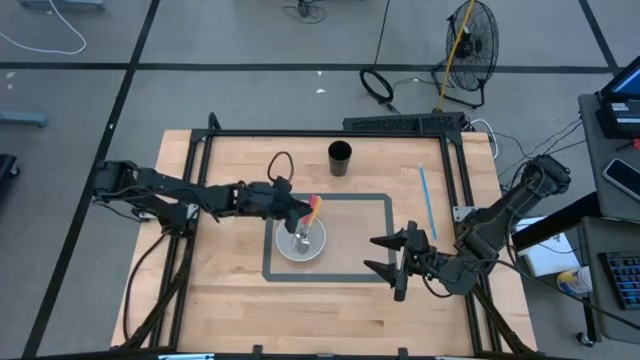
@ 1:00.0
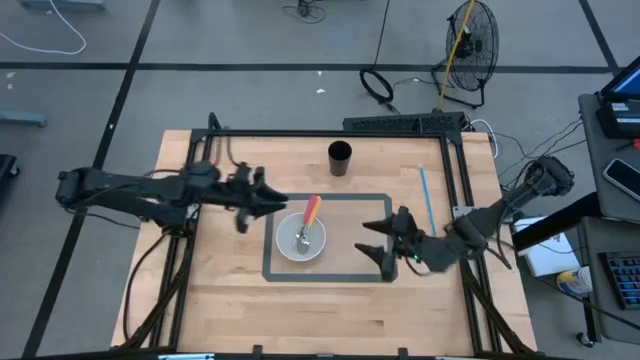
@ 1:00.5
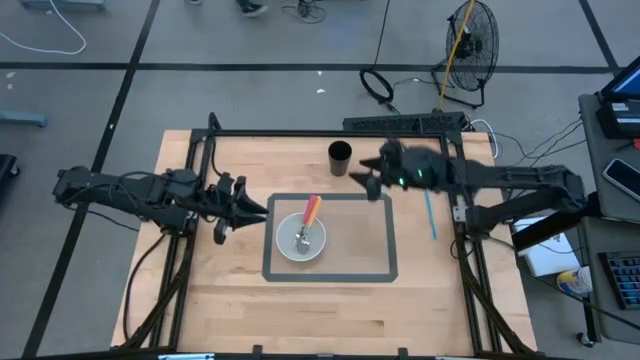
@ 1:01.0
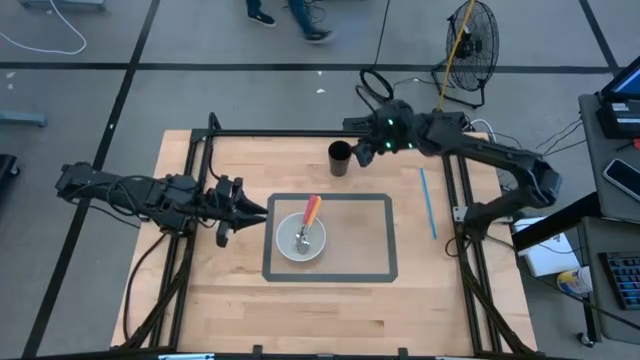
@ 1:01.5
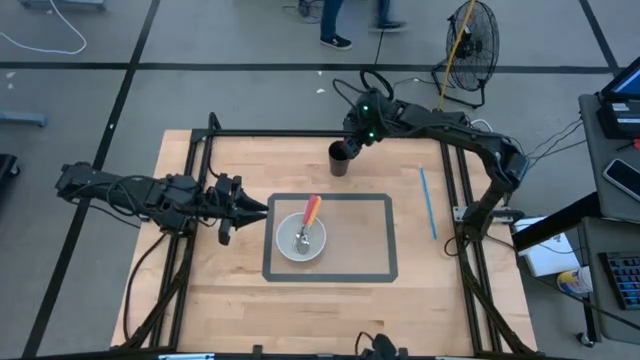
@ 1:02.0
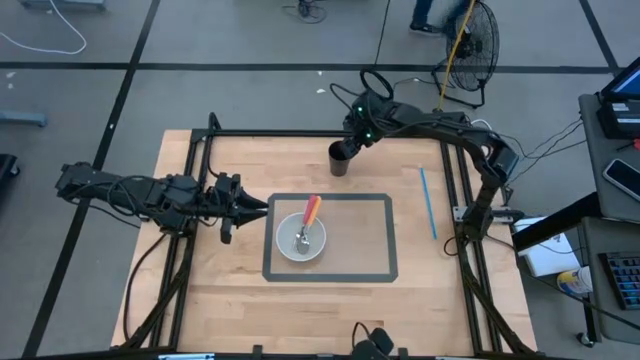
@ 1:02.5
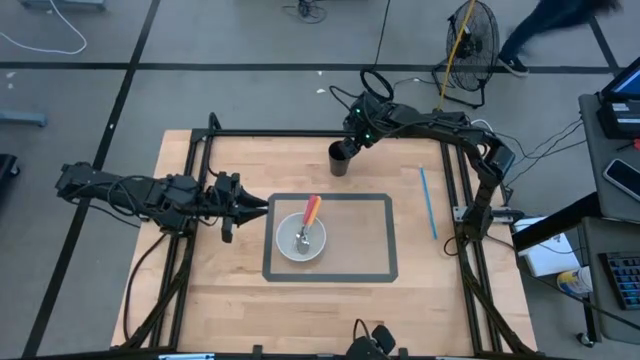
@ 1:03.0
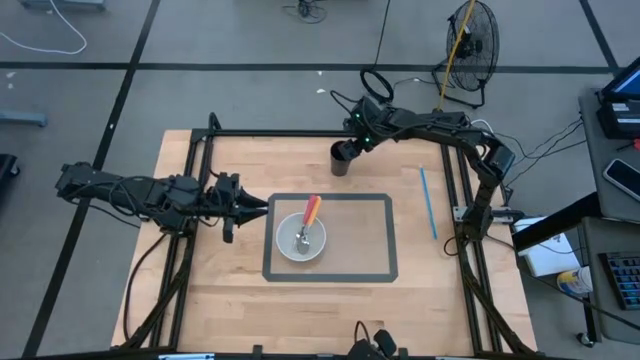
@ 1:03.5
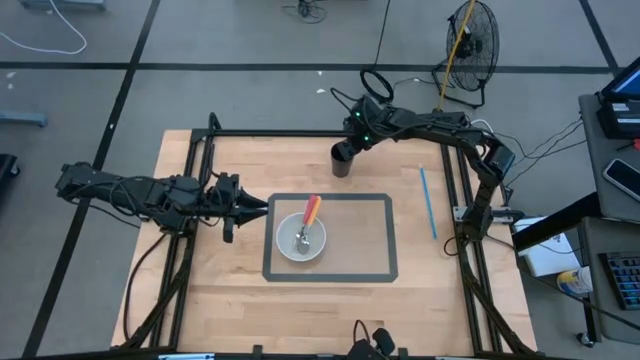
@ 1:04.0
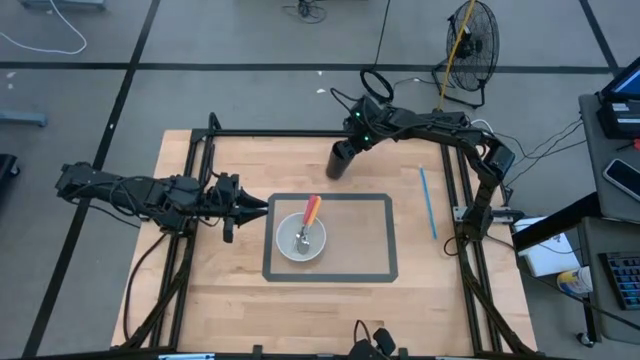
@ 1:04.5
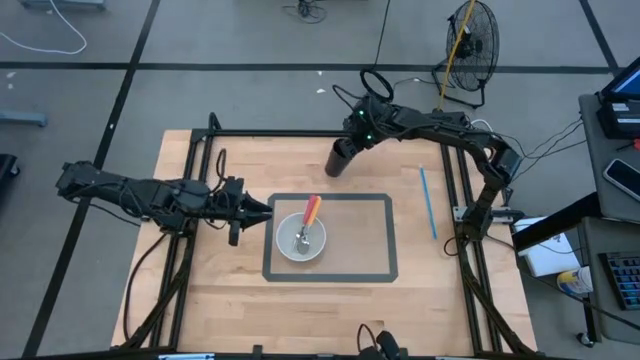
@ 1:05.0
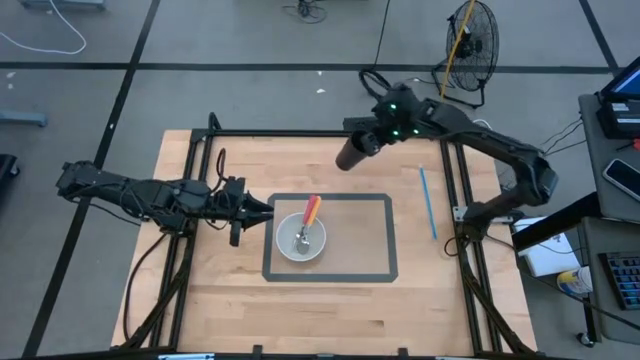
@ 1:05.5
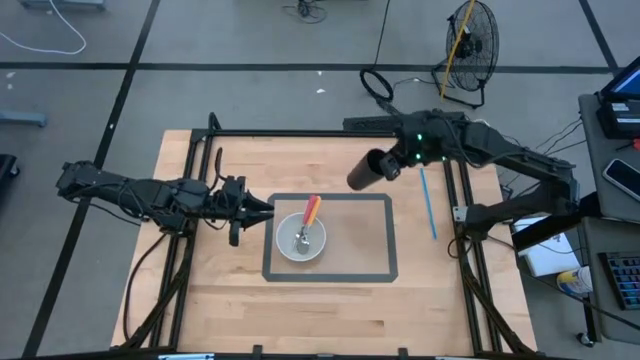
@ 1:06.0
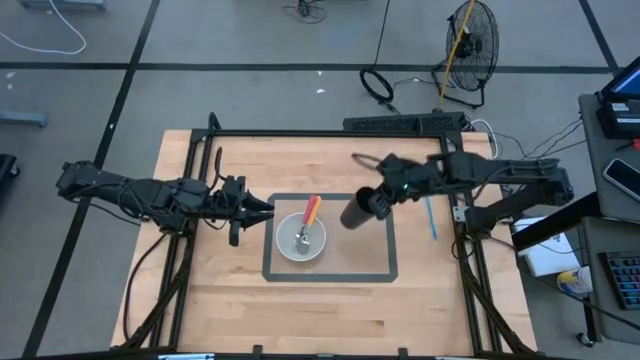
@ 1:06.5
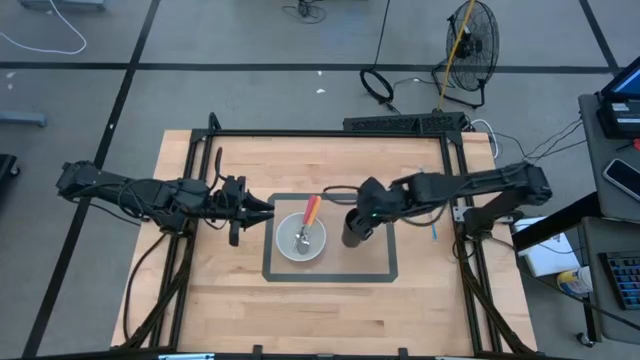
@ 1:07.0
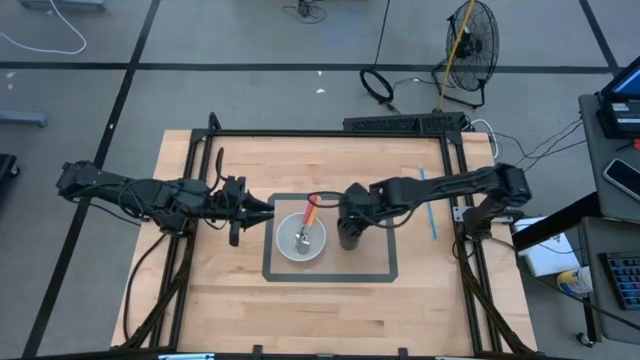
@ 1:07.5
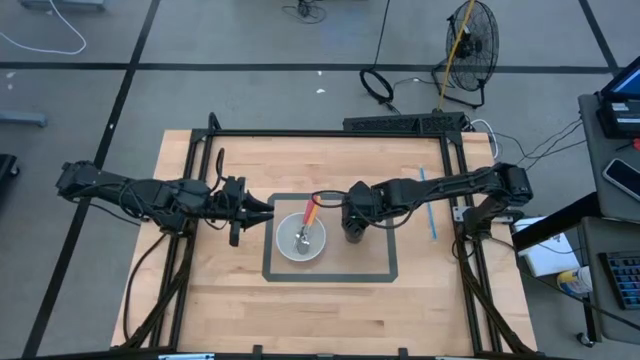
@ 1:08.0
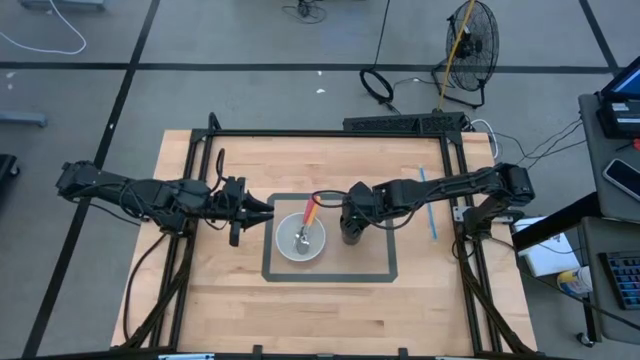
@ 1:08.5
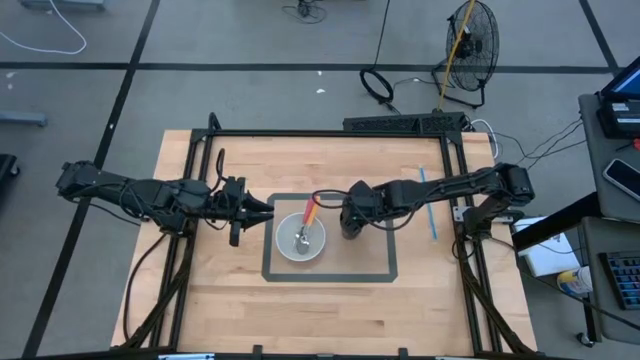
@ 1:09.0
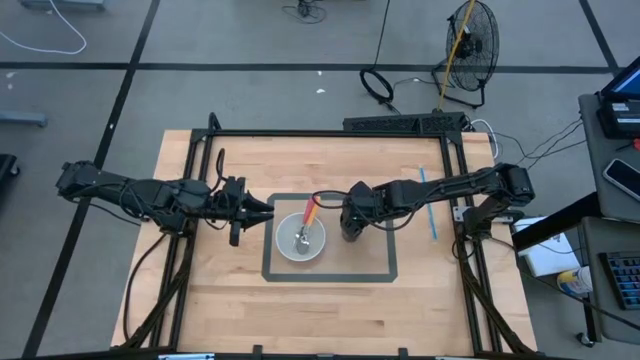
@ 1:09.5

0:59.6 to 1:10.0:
Task: Pick & Place Utensil
Put the black cup on the light brown mat to the right of the white bowl

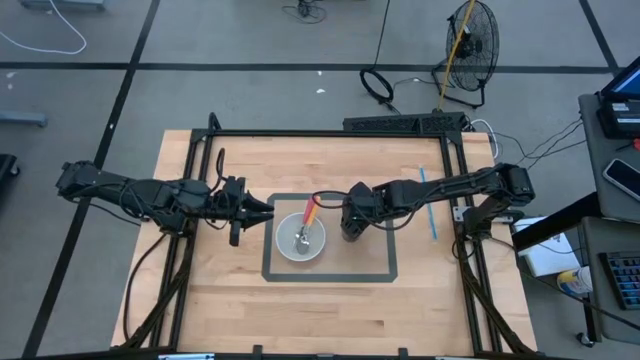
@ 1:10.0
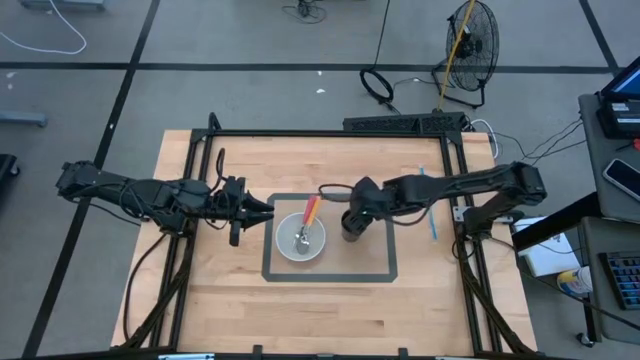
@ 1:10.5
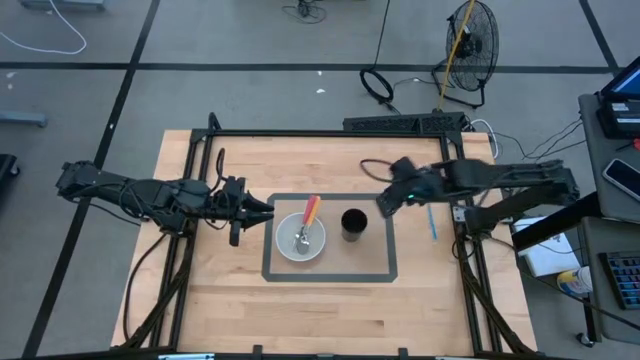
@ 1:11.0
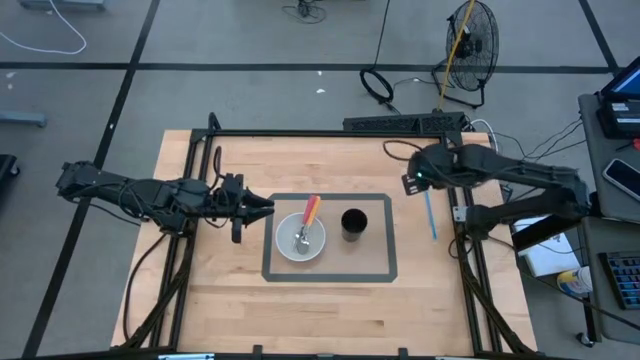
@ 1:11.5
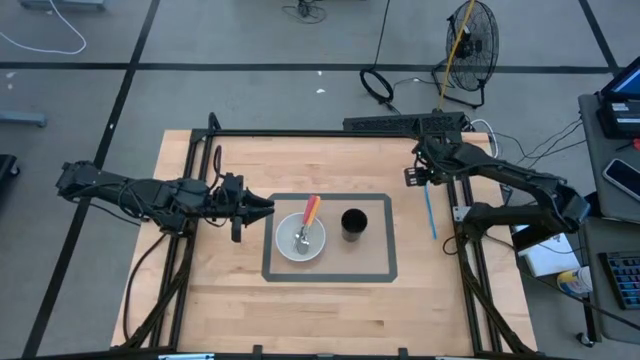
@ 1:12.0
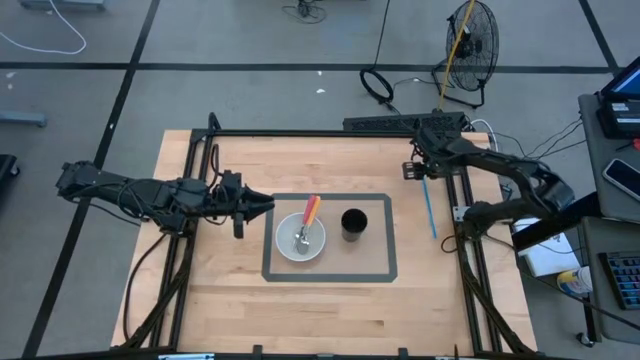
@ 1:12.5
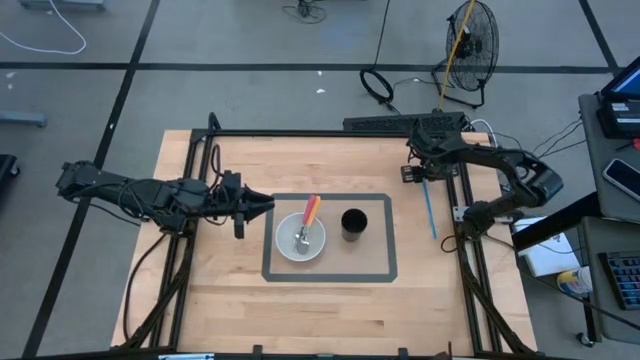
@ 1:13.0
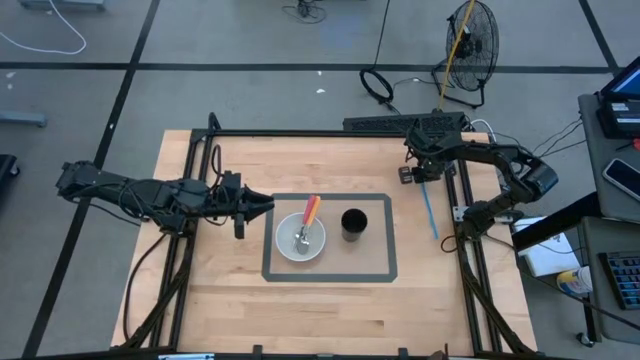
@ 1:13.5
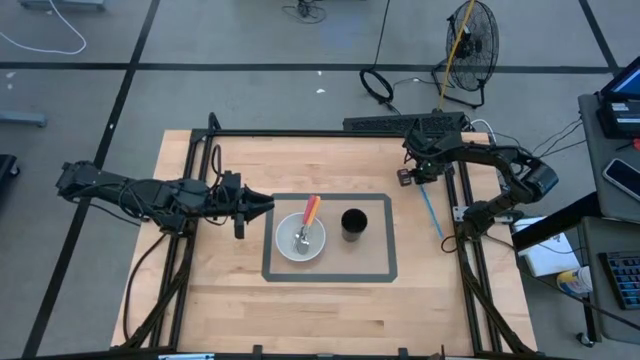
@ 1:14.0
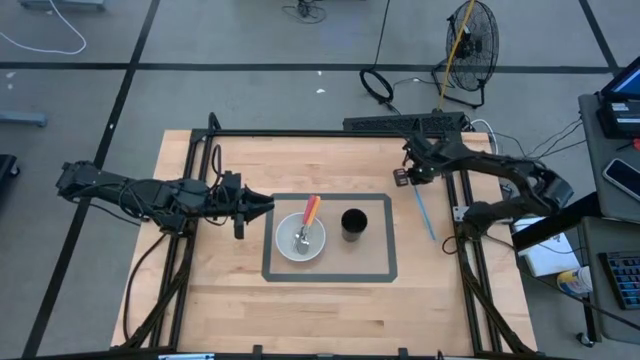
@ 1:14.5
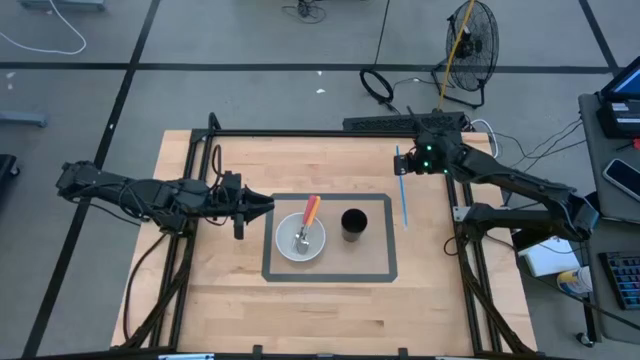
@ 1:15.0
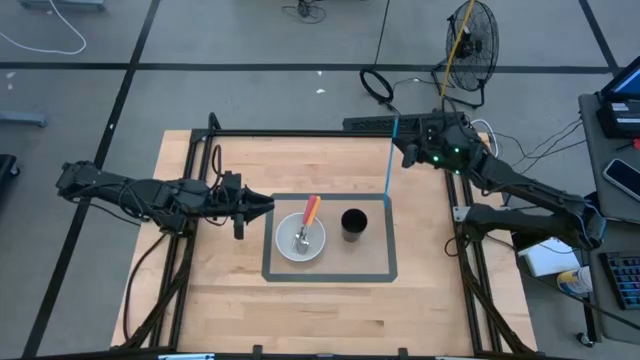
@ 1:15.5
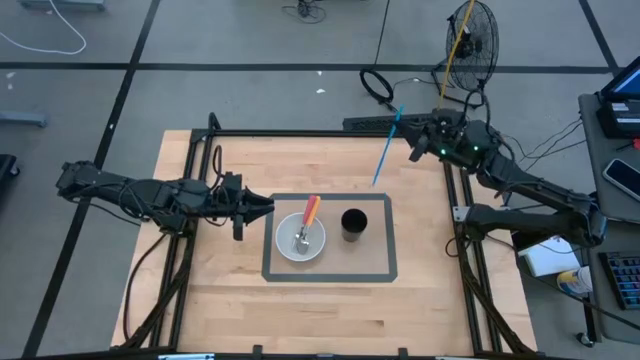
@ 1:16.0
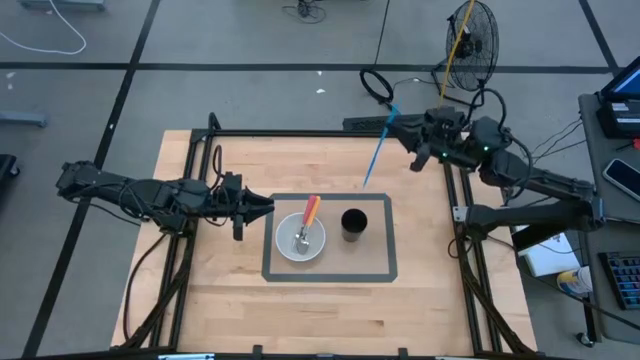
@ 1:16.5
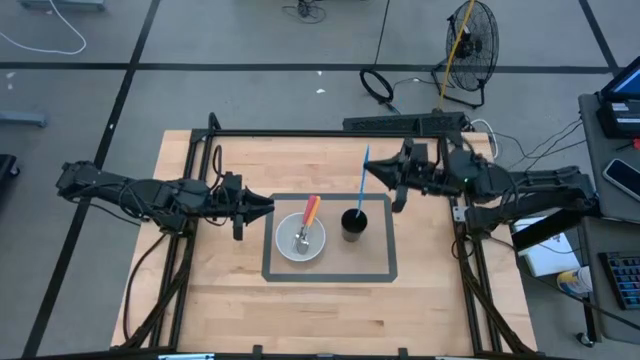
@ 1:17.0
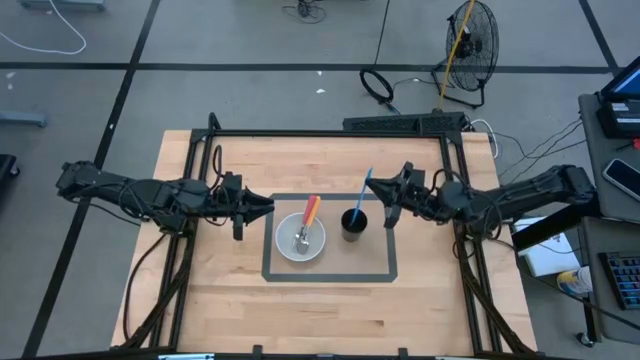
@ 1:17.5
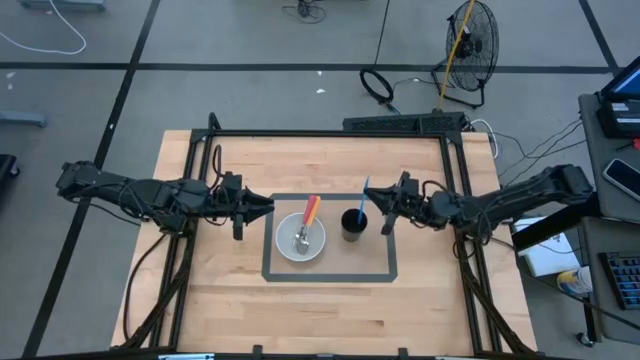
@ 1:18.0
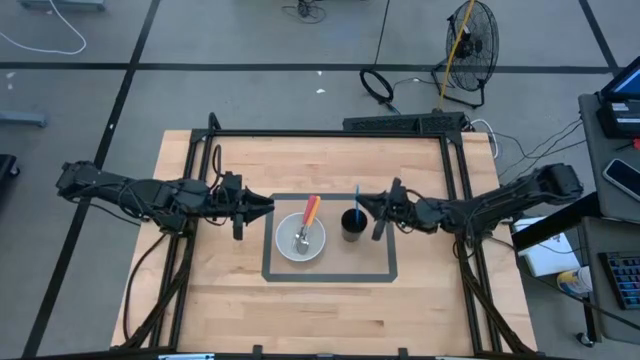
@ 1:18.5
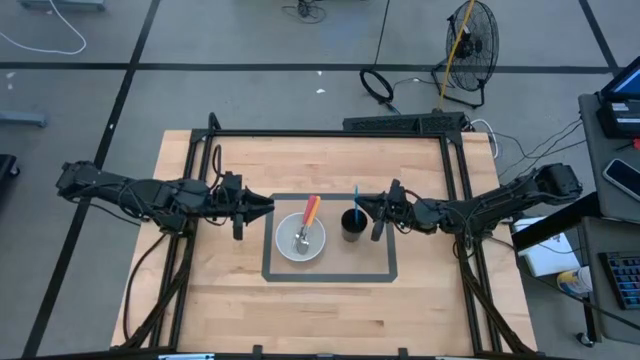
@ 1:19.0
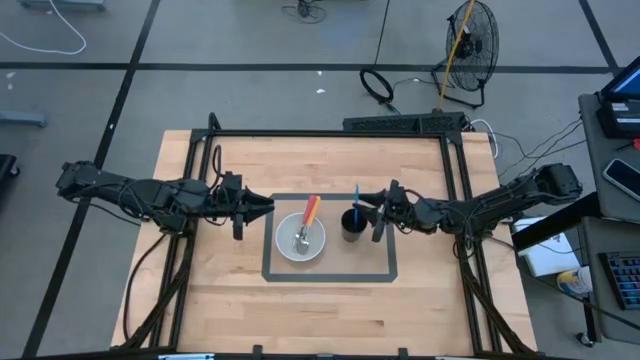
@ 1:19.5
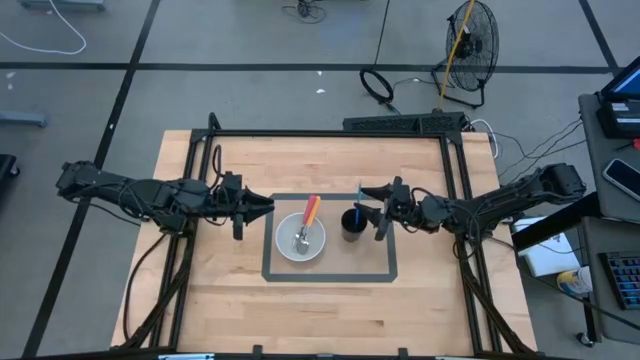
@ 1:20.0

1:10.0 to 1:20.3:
Put the blue straw into the black cup on the light brown mat
